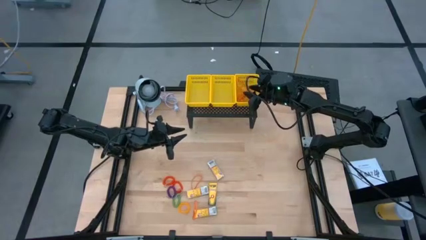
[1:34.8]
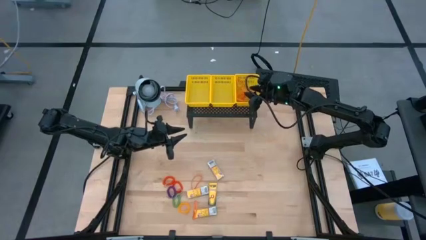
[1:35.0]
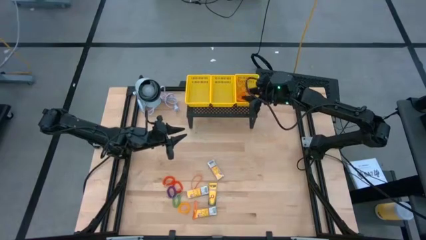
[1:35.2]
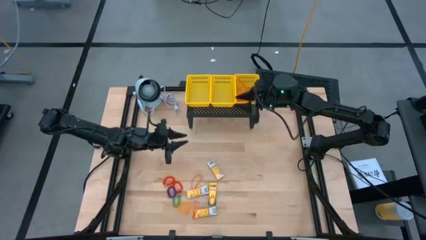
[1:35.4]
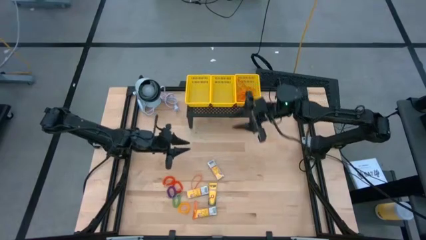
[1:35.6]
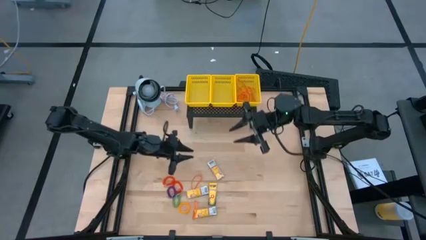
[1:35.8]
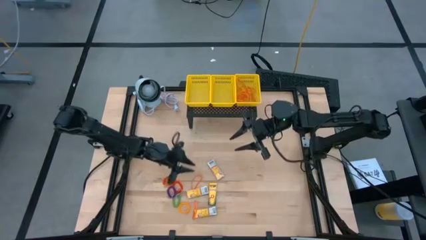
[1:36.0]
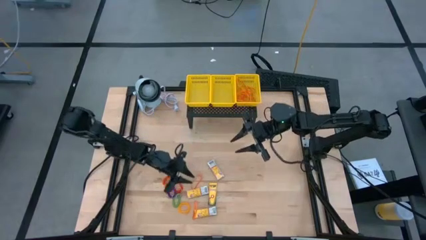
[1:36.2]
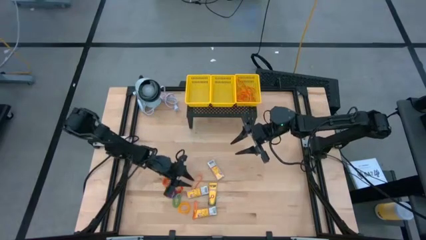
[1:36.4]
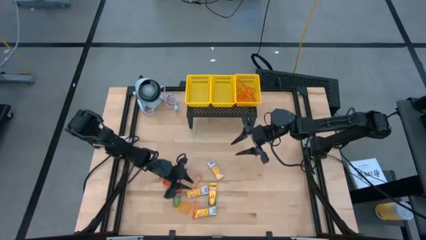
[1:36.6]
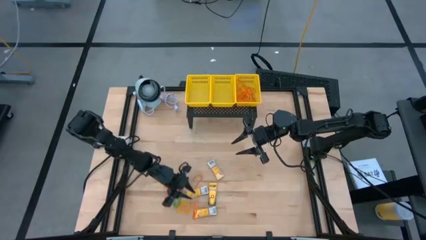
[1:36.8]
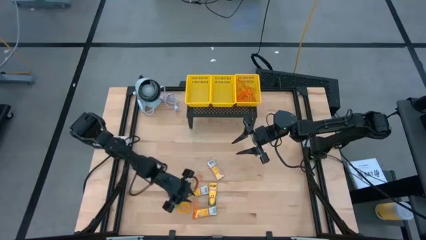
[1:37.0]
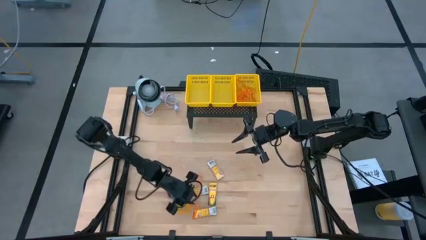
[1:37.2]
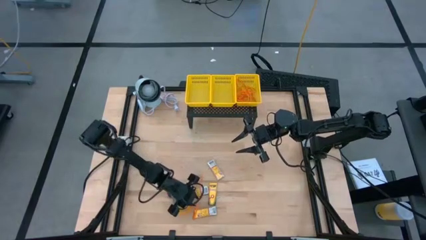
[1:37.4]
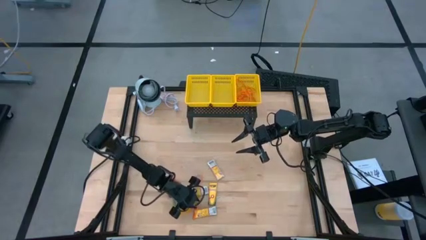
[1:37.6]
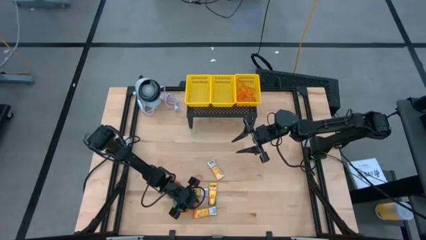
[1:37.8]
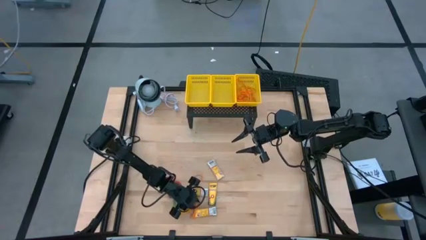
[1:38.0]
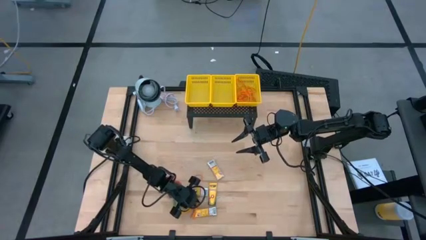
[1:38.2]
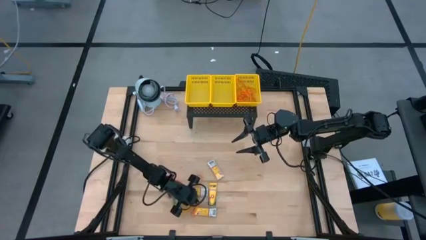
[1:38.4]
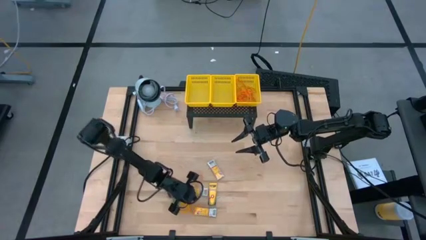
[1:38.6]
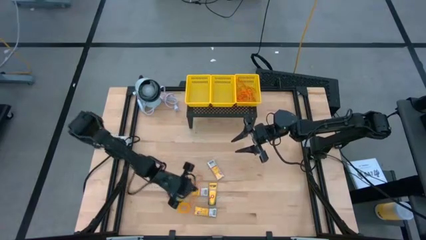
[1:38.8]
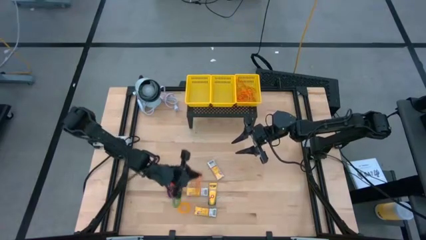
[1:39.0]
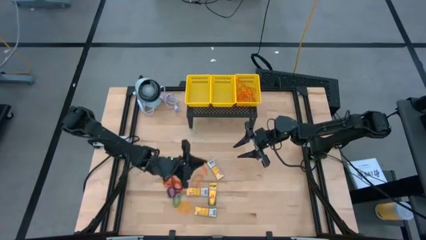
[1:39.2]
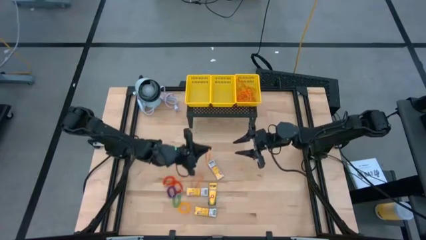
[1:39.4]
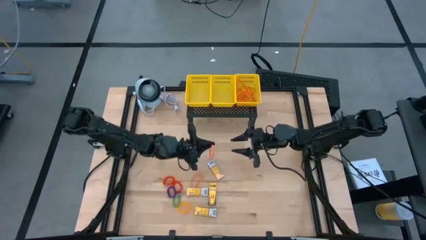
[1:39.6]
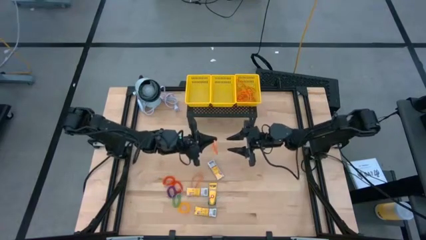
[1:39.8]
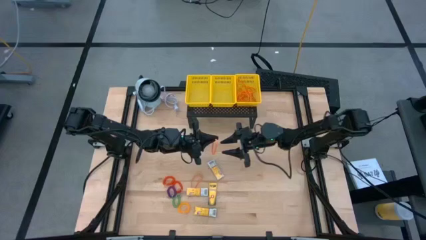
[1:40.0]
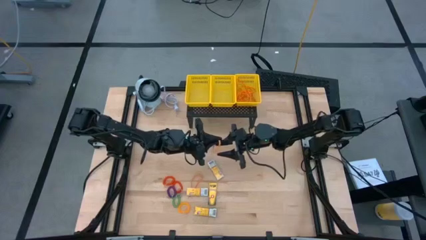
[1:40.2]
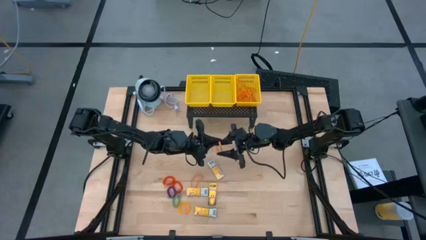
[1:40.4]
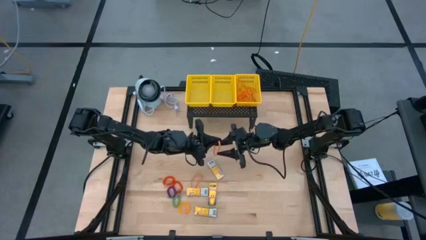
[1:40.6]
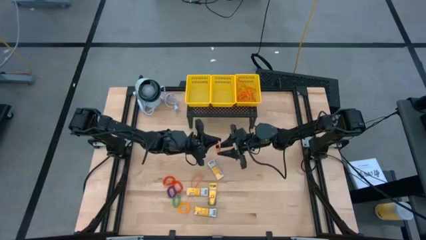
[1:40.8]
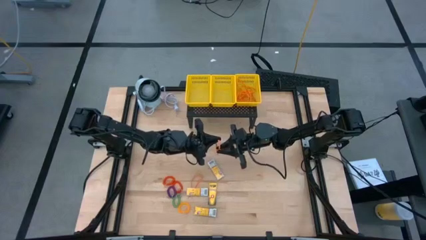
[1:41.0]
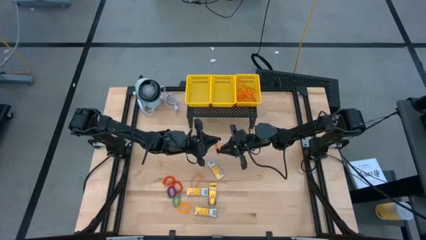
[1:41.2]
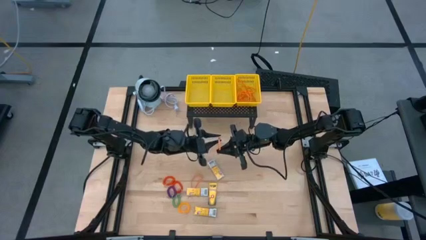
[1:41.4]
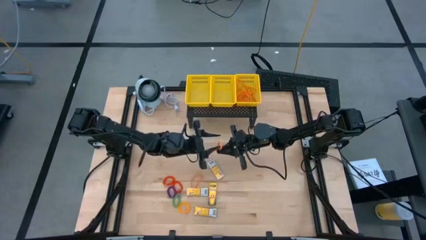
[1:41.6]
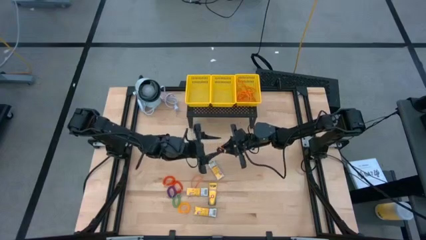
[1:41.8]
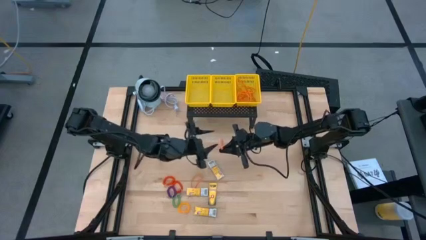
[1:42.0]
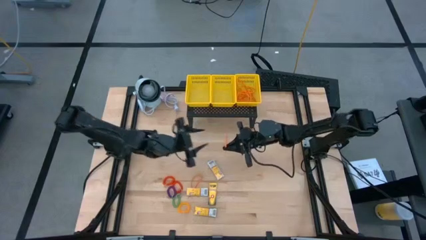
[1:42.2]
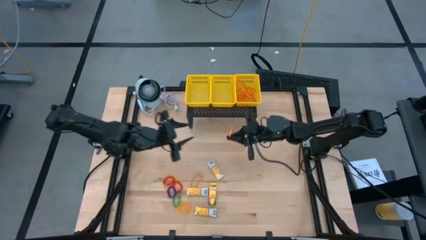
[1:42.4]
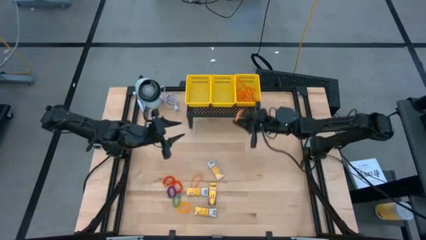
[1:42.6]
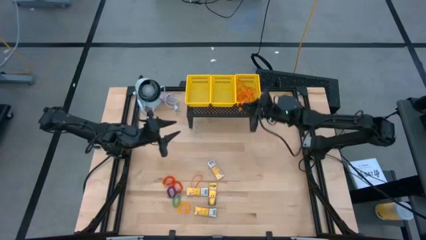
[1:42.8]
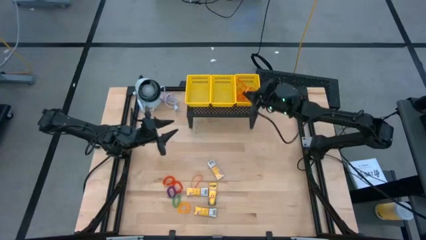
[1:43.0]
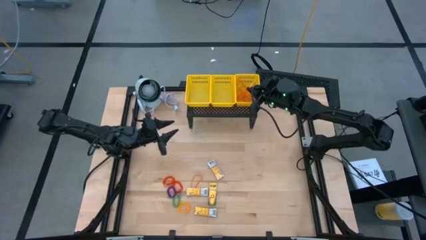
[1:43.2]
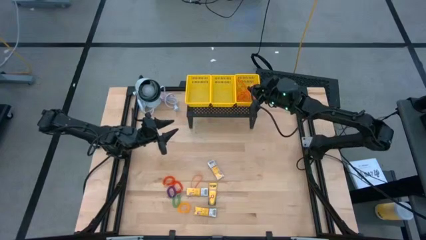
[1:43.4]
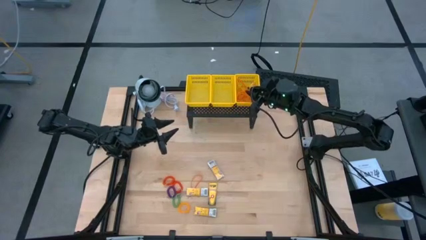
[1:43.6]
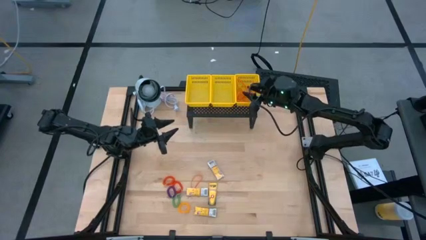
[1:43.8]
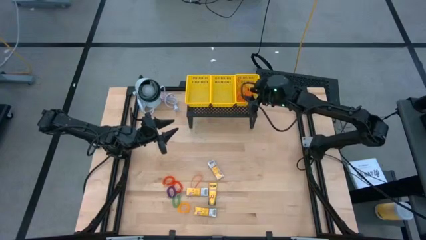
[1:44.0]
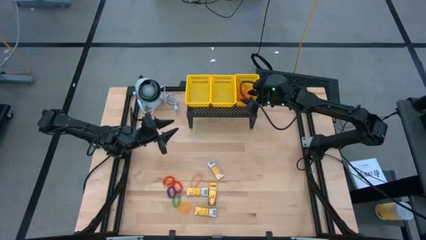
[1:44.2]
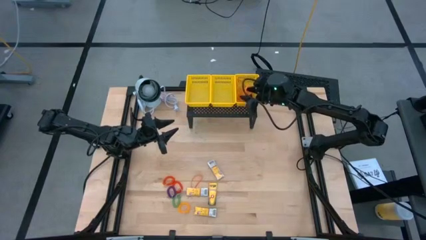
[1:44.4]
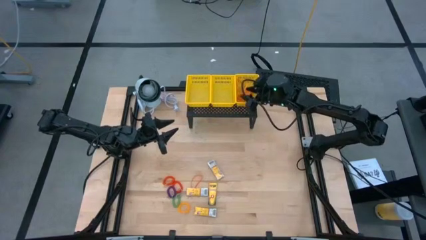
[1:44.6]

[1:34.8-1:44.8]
Task: Pick & Place Office Desk Supplies
Put the orange rubber band into the right yellow bin on the shelf

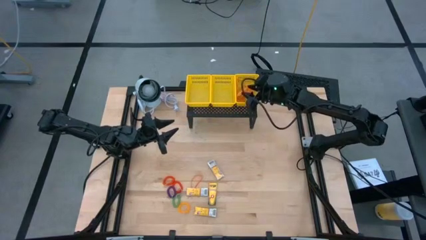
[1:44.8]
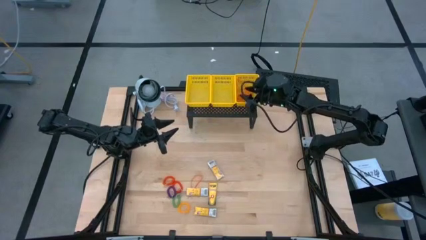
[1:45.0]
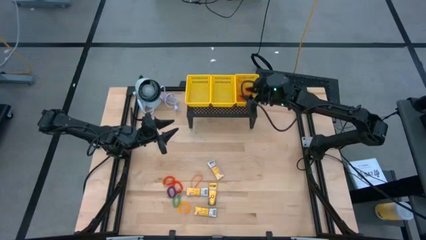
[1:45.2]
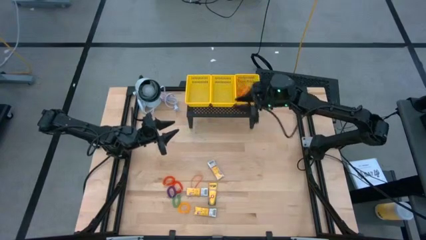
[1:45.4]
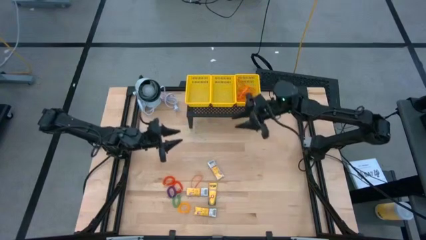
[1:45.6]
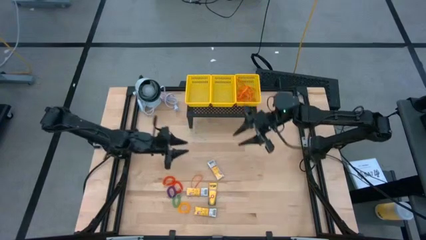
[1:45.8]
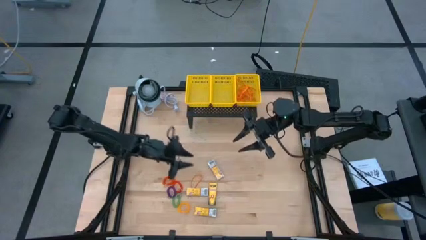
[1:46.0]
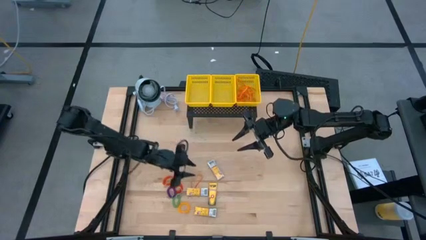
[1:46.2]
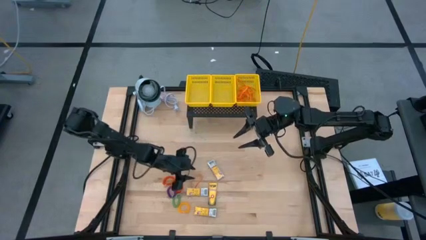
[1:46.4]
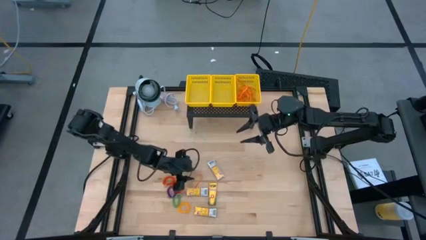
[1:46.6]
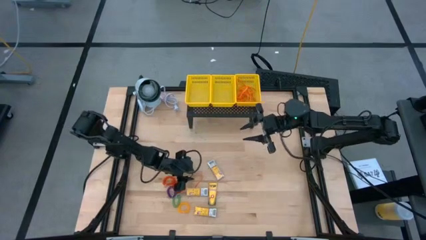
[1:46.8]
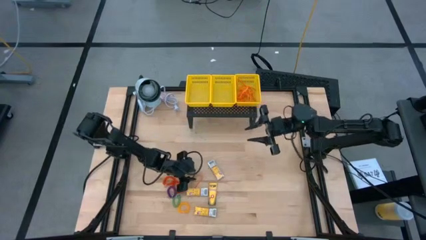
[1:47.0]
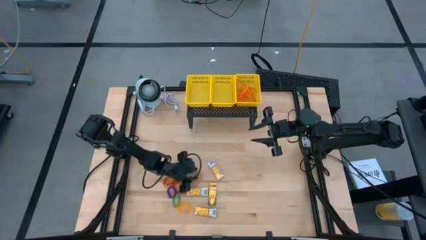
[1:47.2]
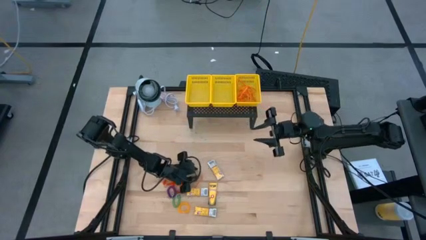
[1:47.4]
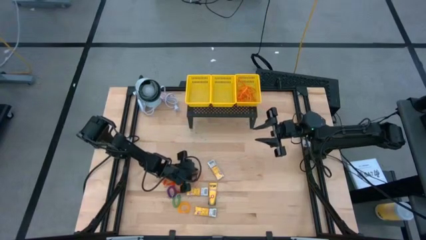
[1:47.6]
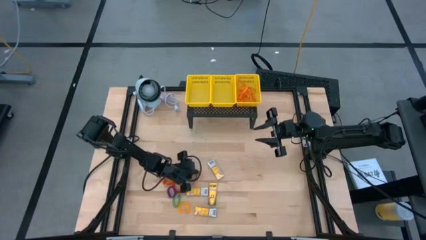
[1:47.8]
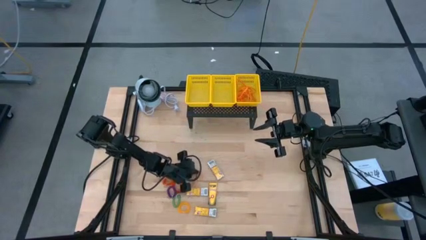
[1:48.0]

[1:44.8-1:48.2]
Put the orange rubber band into the right yellow bin on the shelf

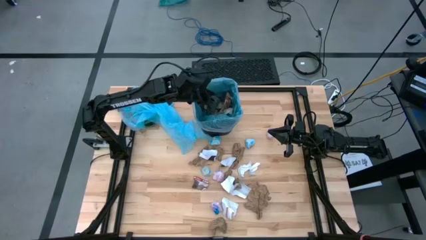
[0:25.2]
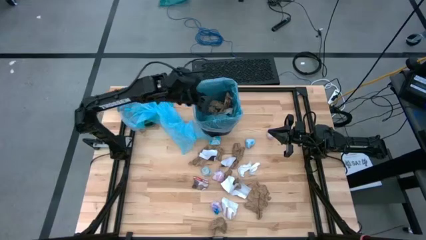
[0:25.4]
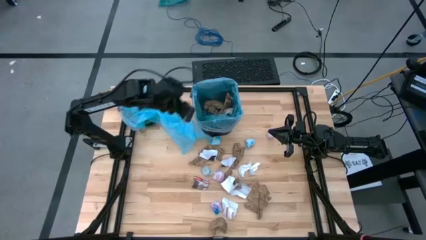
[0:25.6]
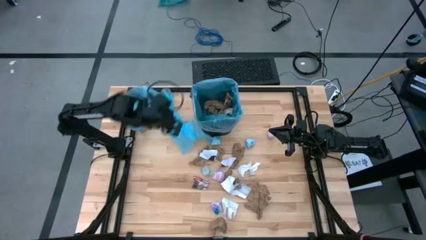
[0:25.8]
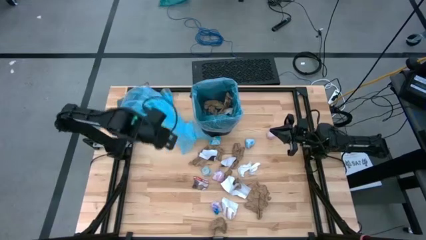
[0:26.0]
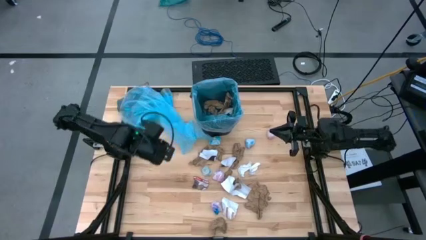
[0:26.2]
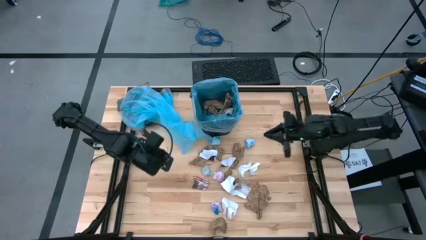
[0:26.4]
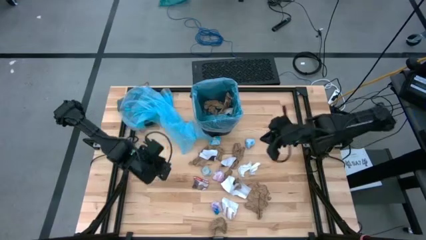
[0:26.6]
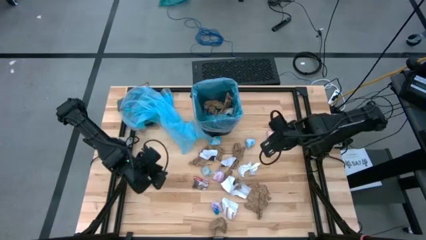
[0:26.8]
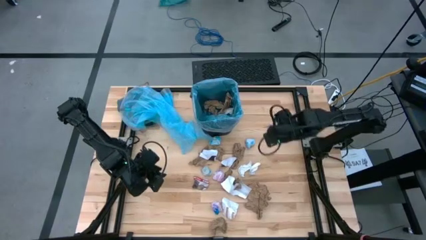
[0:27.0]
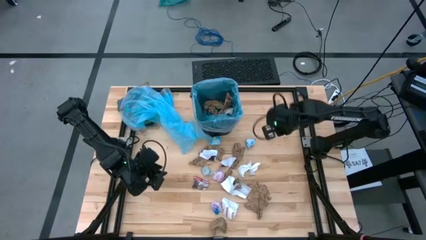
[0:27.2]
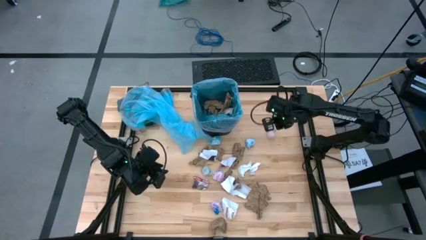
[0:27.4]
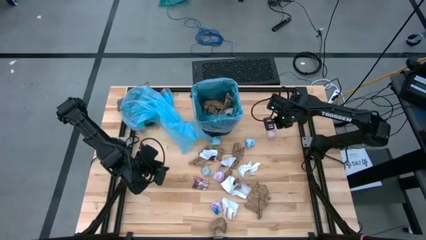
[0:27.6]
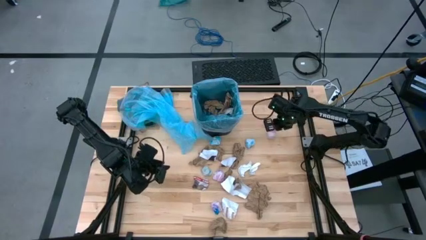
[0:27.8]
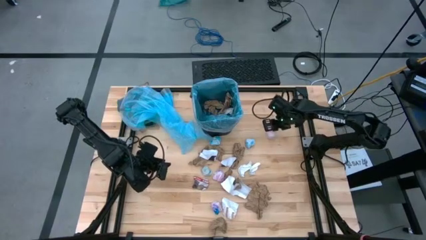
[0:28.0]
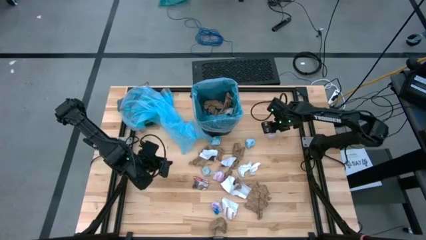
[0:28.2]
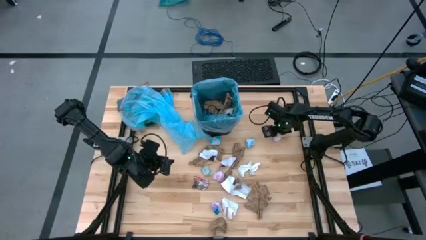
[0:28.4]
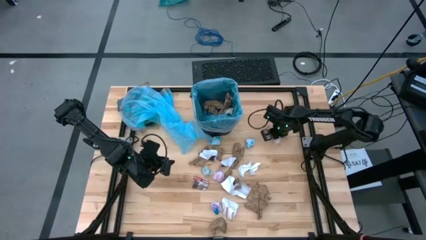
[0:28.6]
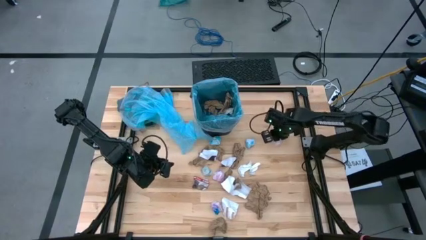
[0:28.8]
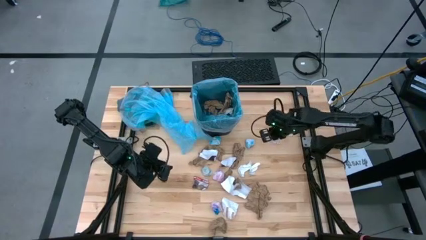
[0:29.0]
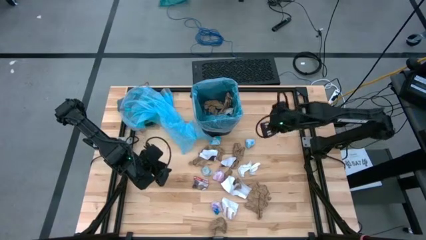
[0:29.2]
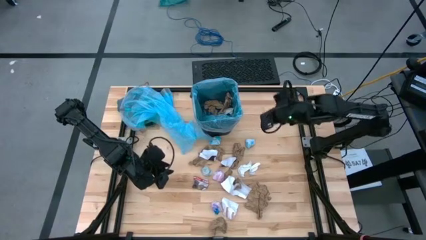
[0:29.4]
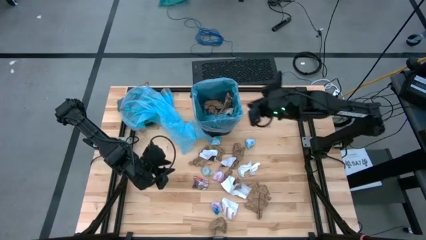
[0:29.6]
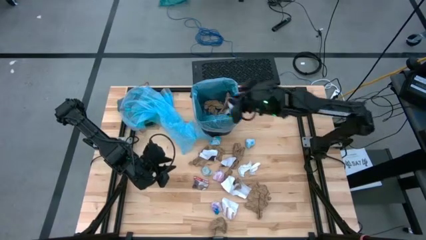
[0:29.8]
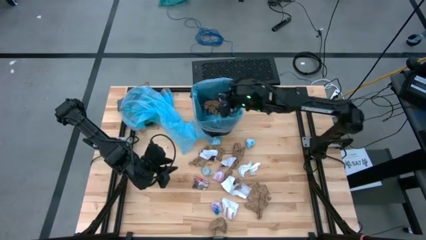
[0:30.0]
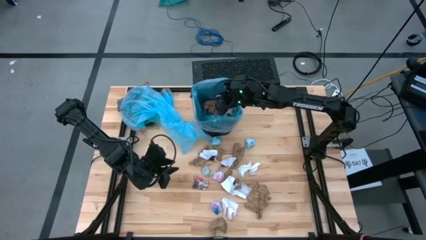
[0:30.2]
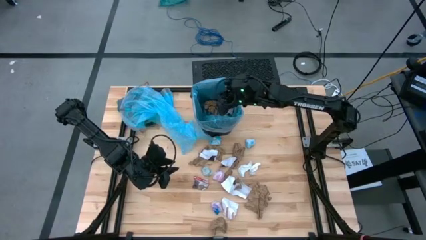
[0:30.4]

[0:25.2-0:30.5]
Task: place trash/remove bag and relplace
Put the pink crumpled plastic bag into the trash bin
